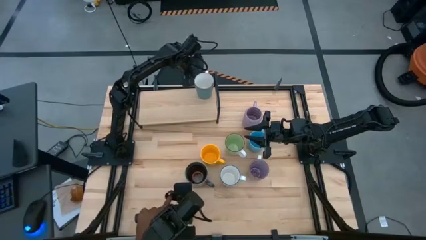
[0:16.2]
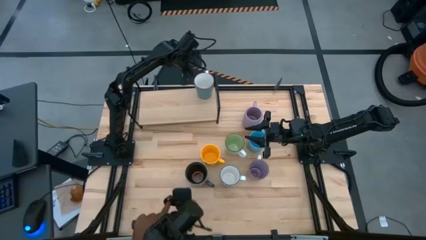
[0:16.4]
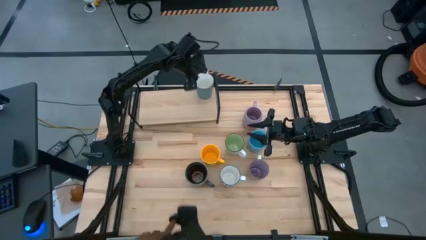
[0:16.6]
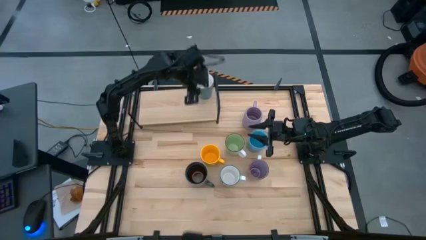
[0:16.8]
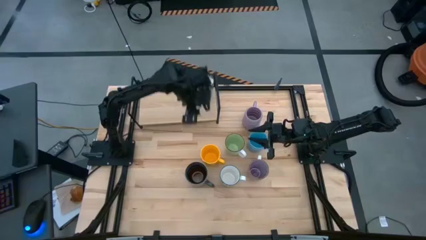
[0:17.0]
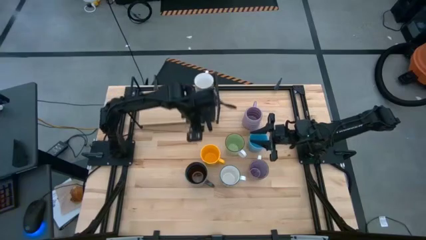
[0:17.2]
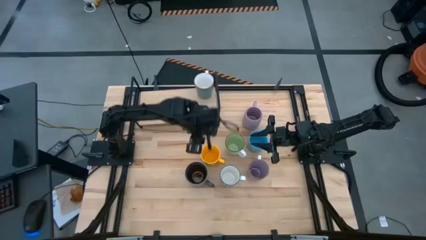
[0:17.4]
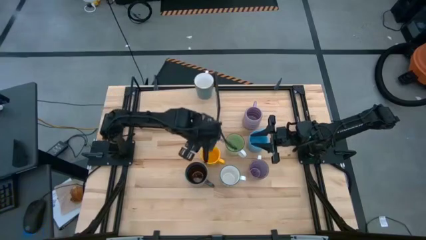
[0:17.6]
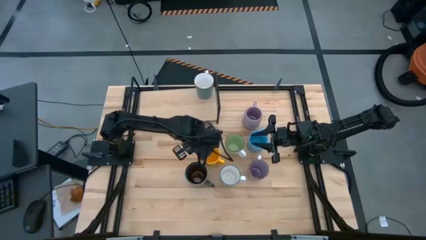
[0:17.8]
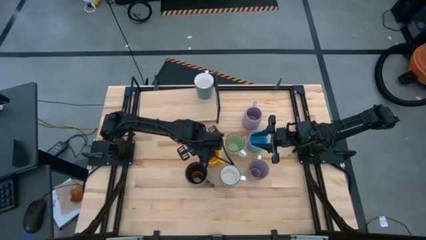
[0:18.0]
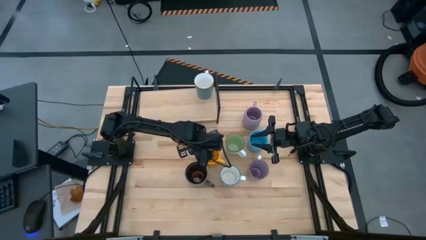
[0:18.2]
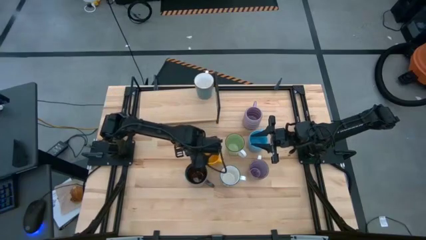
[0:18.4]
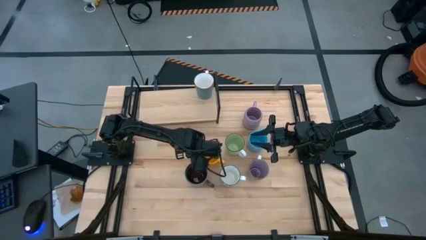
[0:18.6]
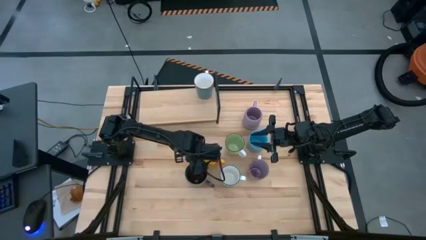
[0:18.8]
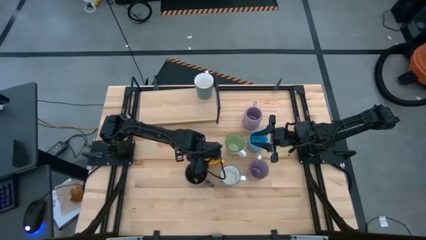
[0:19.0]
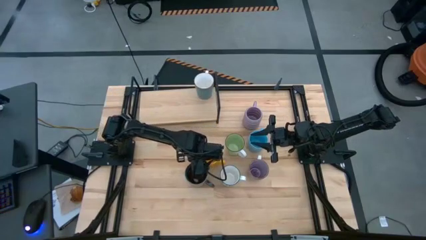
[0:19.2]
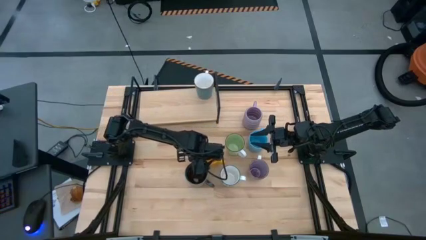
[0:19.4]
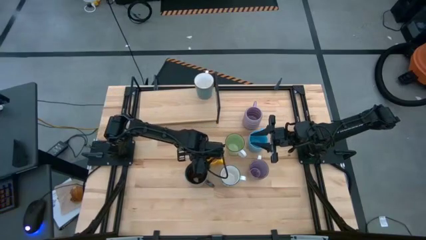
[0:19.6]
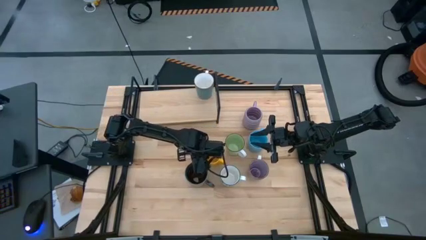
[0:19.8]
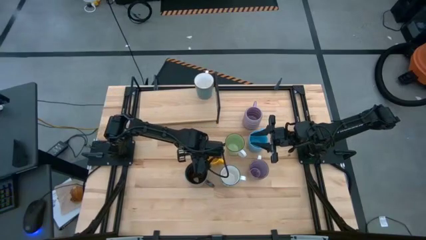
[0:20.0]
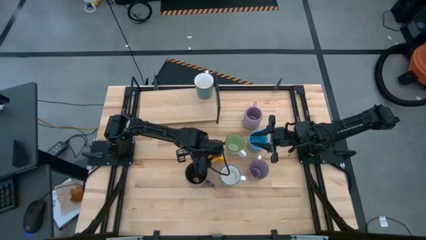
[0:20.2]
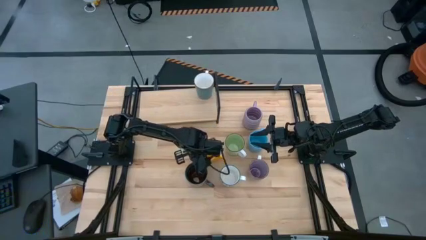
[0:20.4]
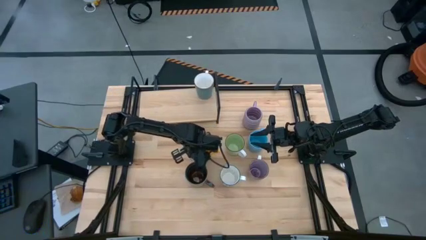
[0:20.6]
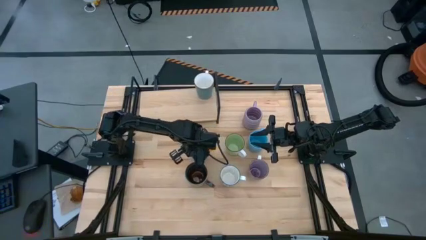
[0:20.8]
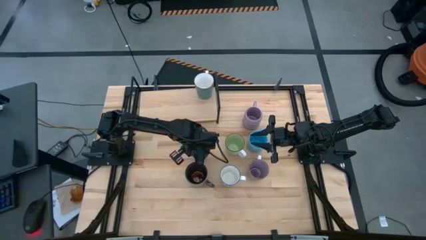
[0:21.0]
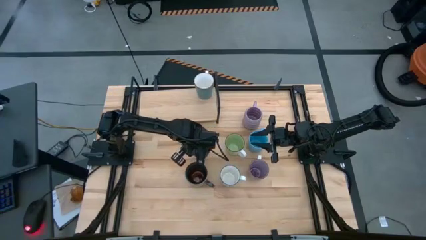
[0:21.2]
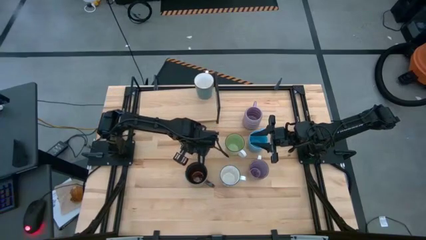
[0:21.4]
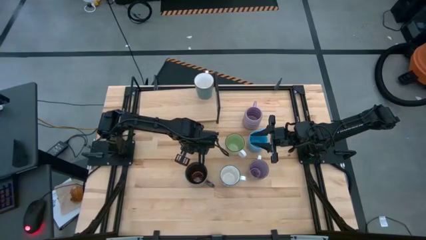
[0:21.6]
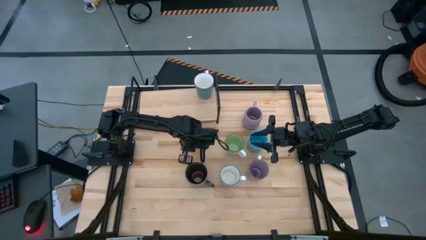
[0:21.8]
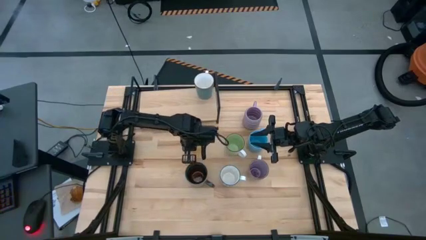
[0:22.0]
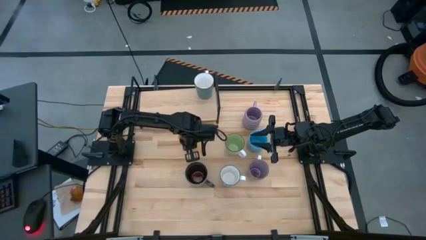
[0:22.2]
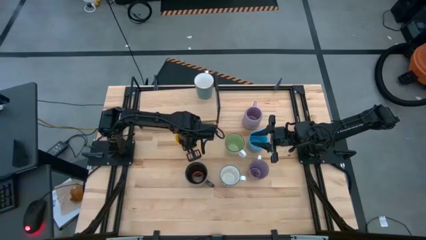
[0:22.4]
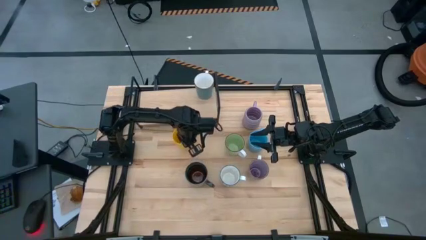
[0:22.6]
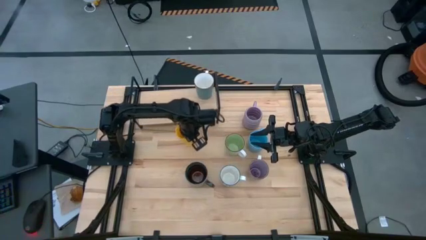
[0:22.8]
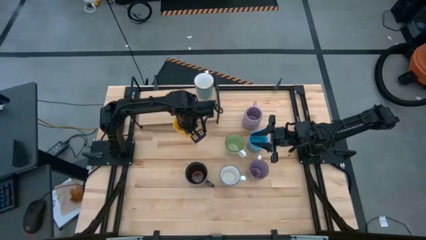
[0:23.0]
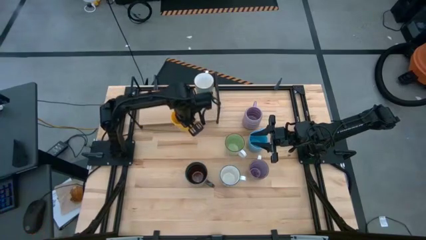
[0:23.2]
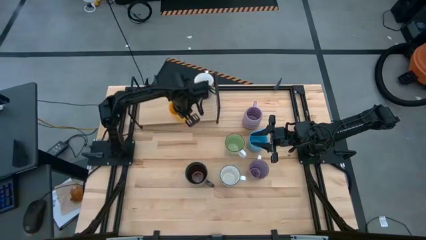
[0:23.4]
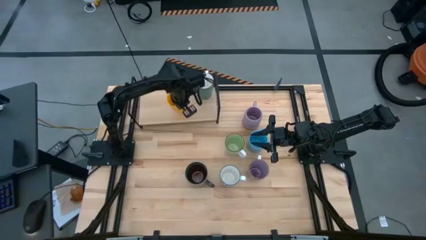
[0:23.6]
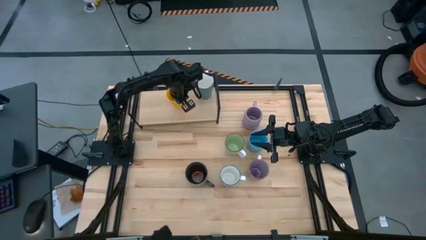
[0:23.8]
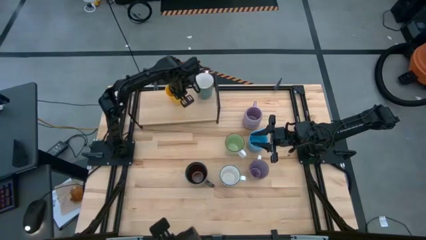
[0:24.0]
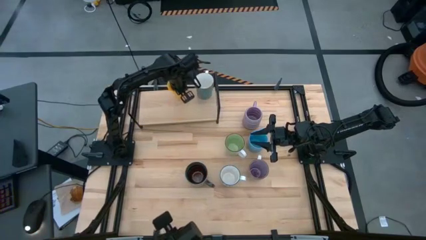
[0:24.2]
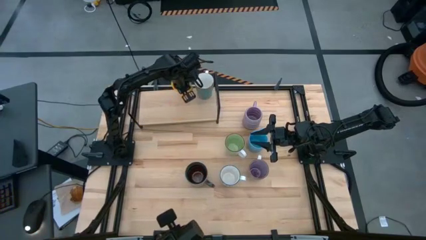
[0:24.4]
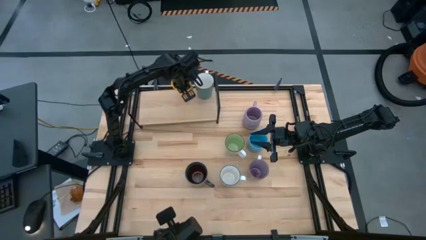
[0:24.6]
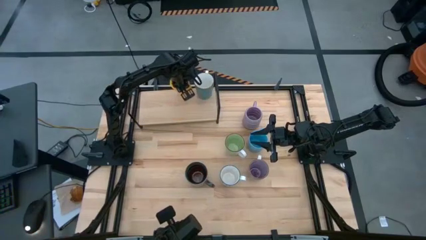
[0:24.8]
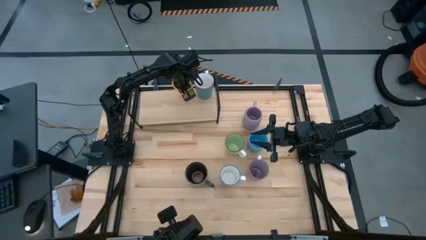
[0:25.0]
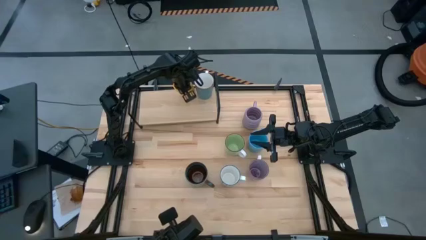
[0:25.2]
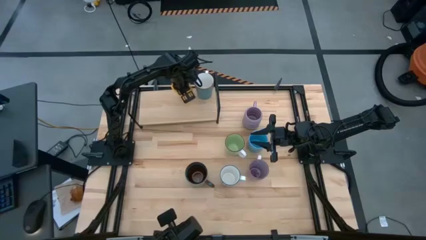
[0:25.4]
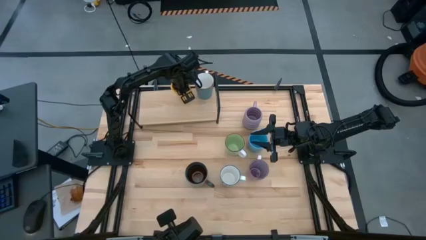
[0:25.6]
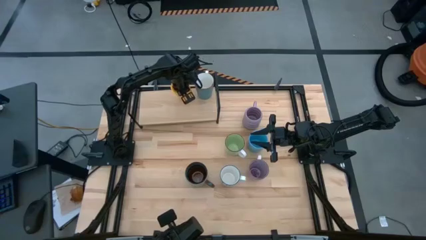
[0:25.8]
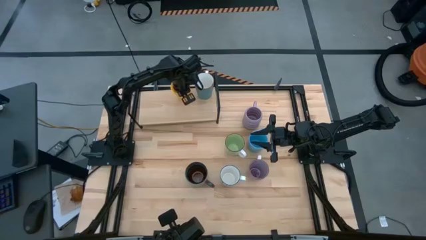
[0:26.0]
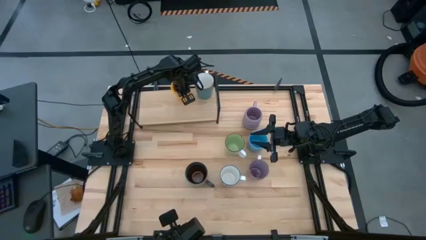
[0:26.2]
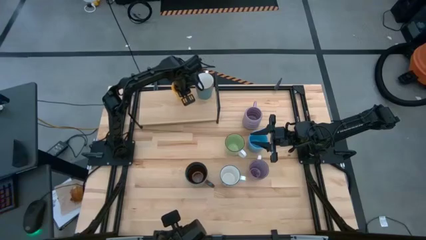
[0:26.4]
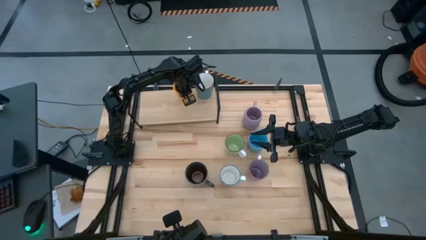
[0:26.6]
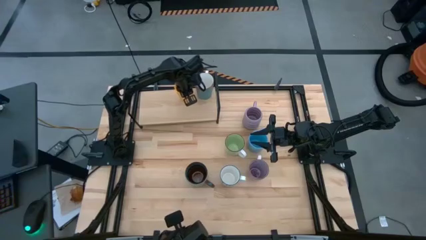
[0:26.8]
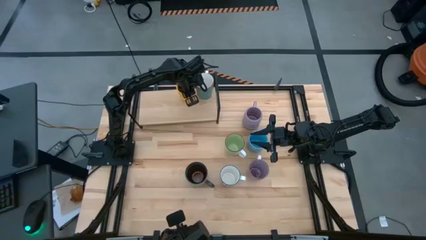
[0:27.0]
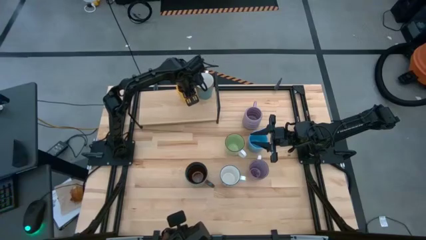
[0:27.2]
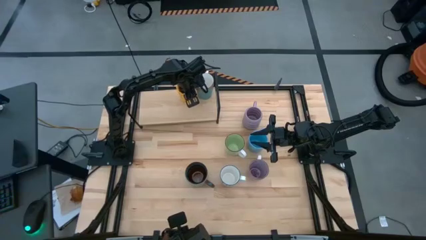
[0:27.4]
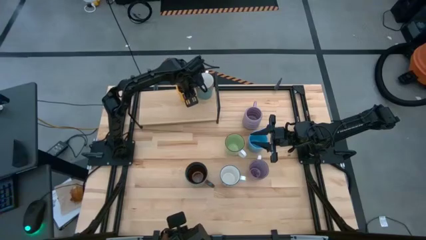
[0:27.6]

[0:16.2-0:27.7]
Task: Place coffee mugs
Put the yellow mug on the shelf
